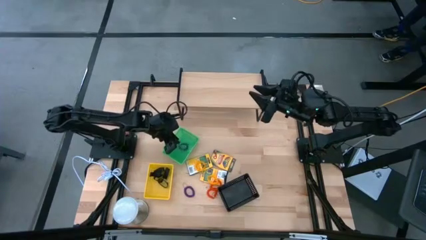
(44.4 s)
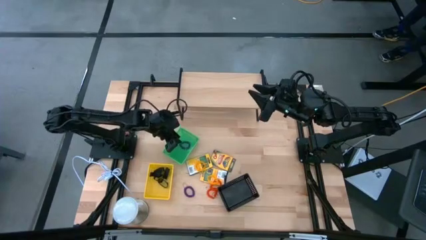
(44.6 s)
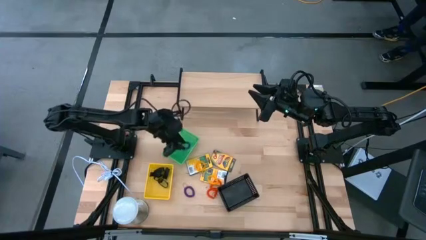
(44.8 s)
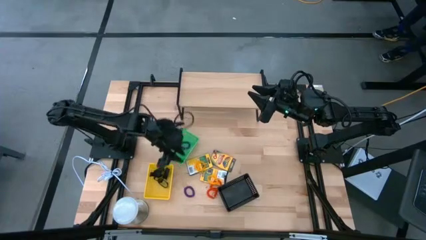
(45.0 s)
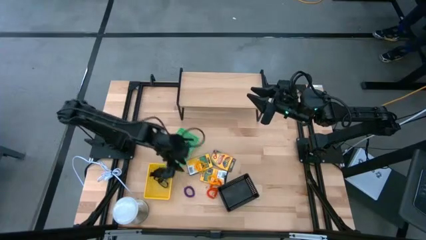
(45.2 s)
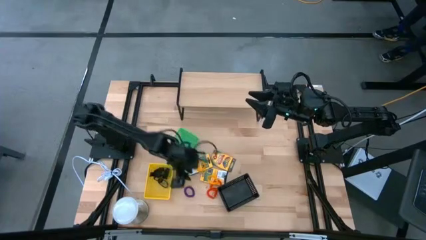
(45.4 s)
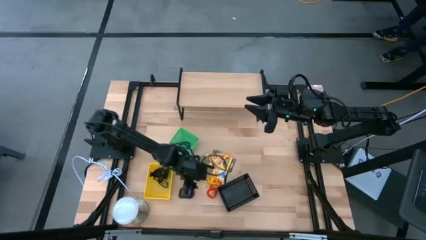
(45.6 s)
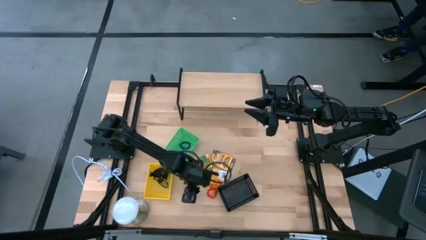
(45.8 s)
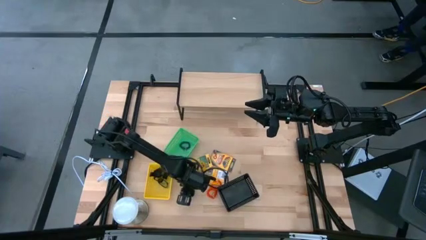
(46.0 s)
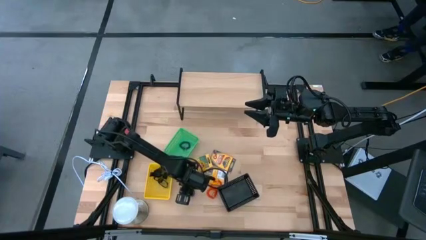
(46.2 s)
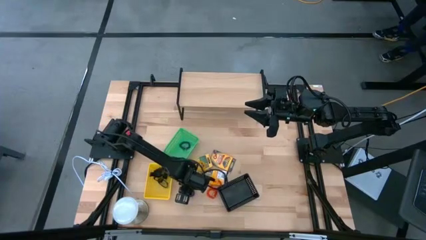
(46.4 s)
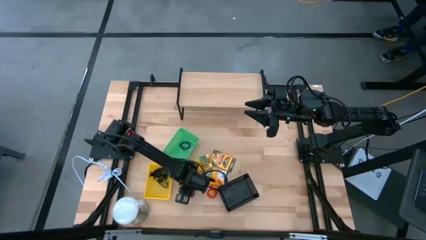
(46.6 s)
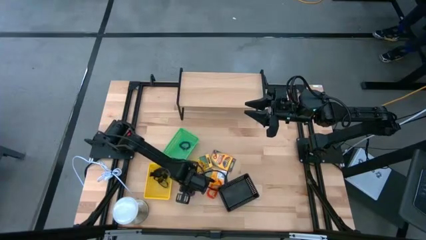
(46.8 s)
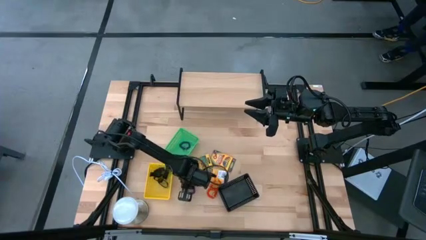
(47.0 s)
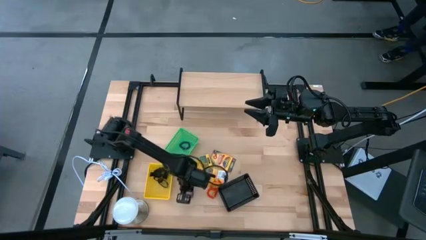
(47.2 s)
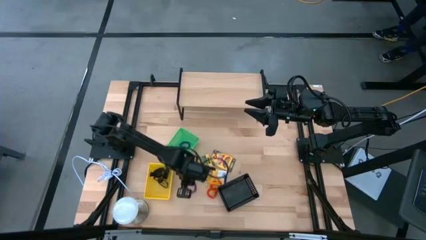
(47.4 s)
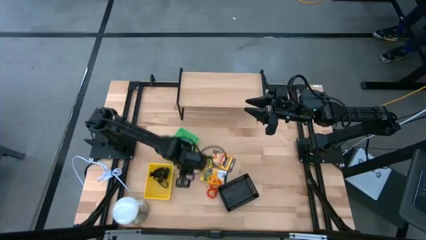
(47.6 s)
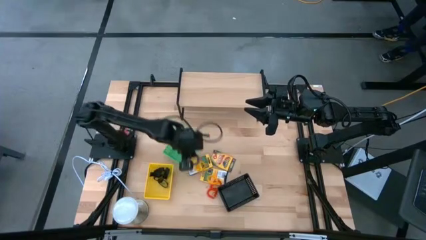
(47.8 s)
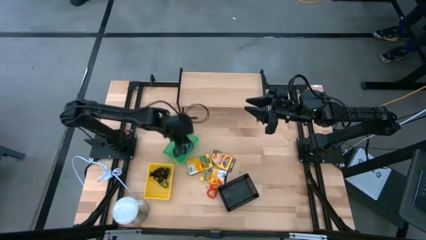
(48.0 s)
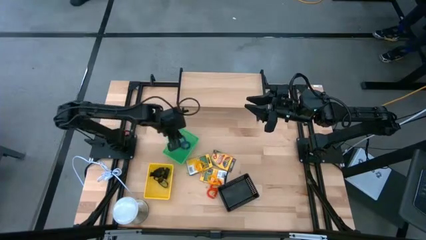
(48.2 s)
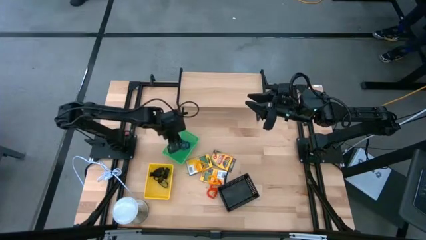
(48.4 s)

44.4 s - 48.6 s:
Task: Pick & Place Office Desk Supplies
Put the violet spring keychain into the green basket

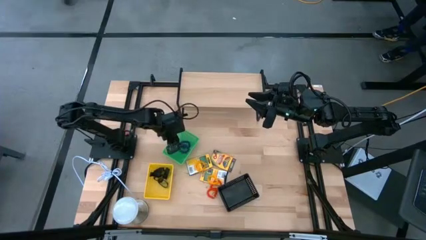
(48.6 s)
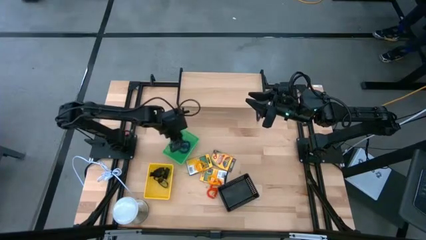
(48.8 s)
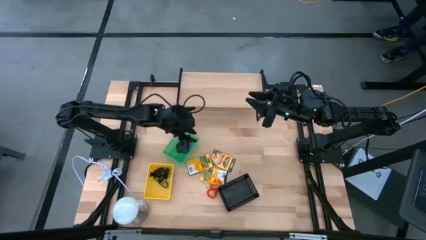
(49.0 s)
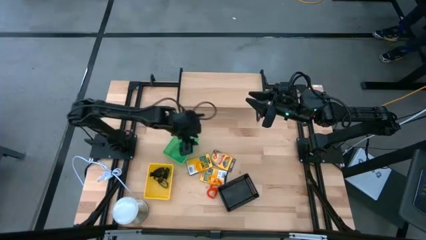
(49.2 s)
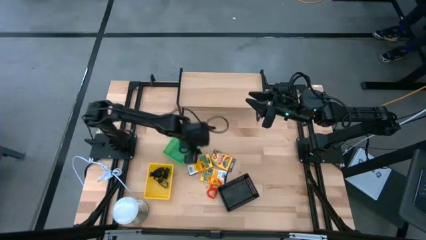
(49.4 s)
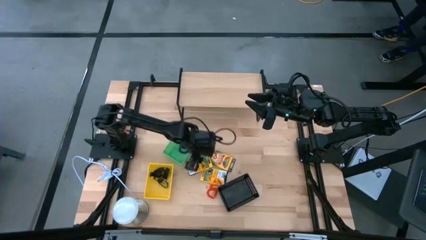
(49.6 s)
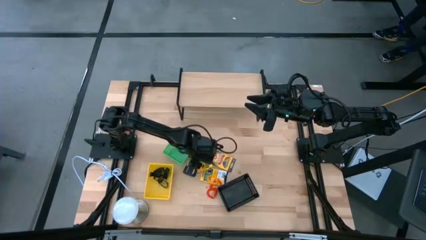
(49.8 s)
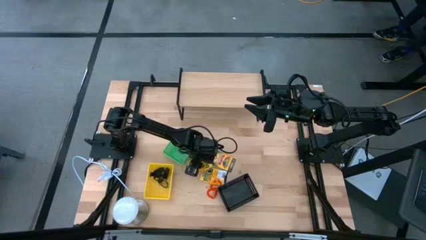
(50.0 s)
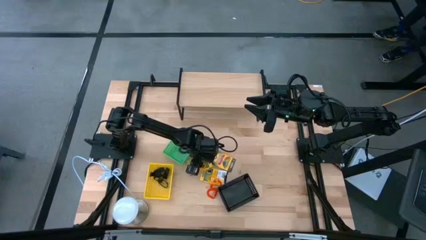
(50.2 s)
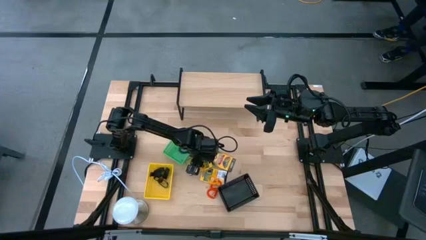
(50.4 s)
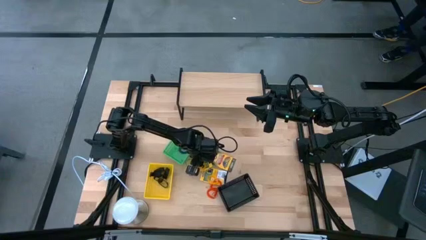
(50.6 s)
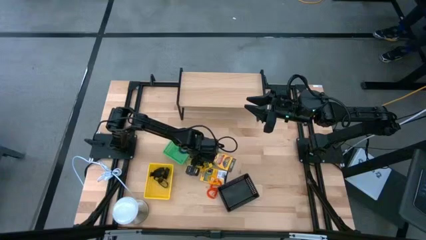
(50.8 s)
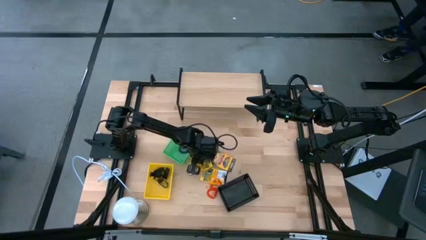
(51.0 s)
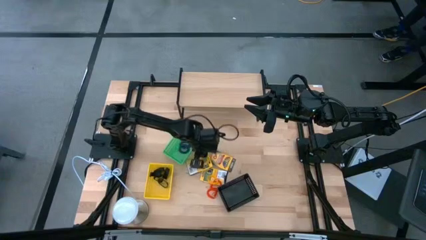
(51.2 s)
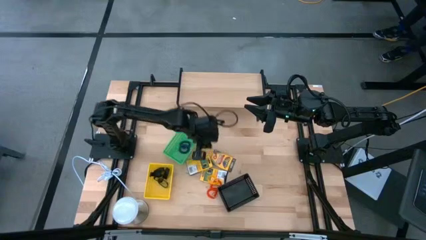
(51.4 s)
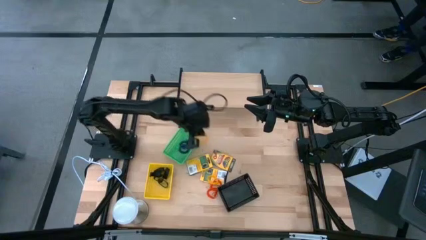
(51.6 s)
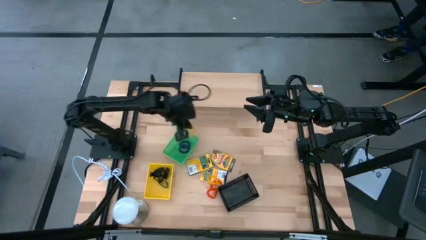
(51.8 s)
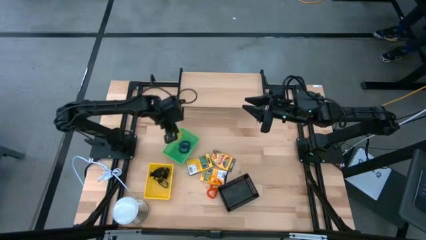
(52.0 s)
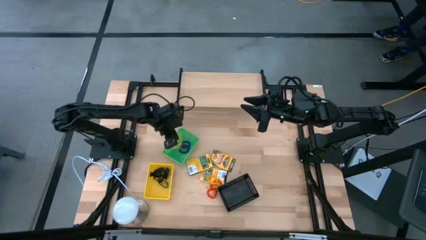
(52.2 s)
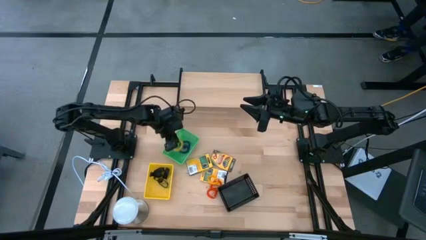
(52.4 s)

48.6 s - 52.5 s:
Put the yellow spring keychain into the green basket

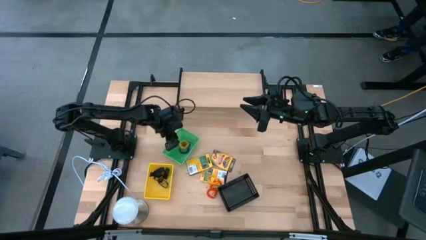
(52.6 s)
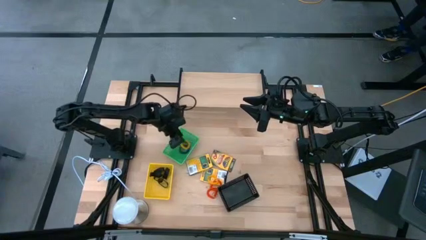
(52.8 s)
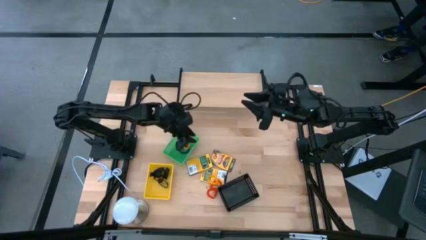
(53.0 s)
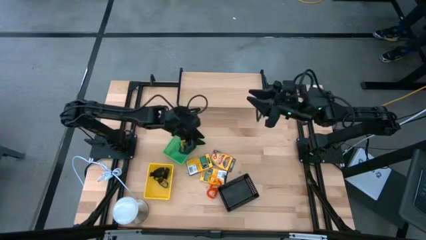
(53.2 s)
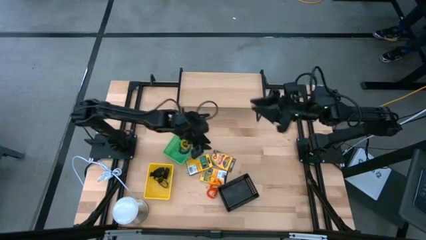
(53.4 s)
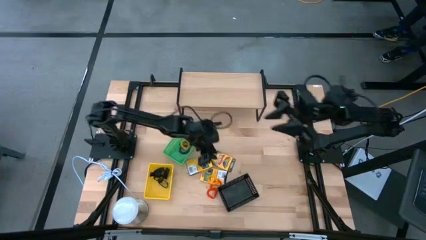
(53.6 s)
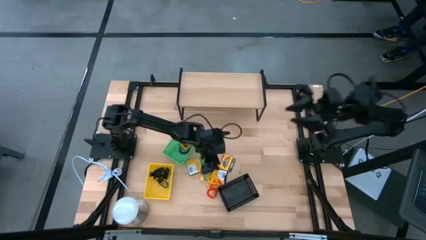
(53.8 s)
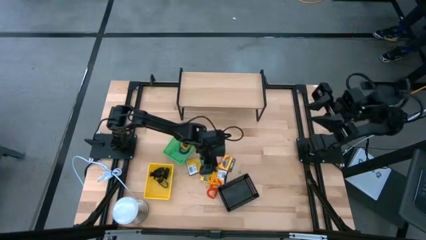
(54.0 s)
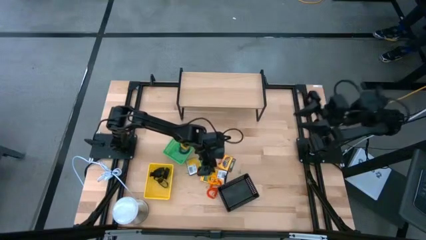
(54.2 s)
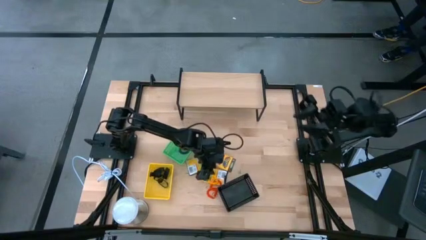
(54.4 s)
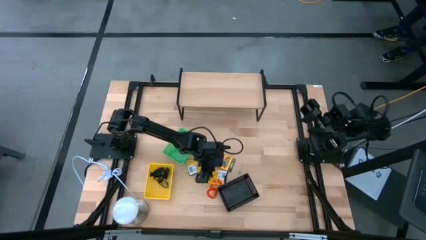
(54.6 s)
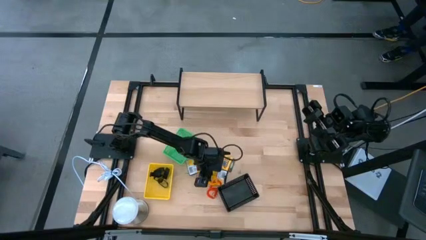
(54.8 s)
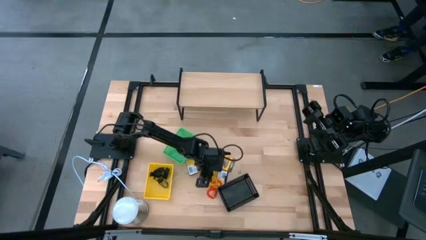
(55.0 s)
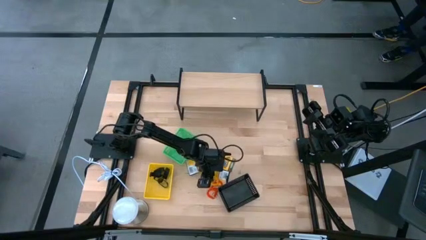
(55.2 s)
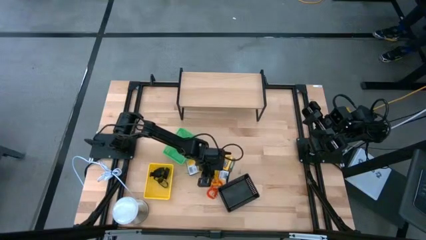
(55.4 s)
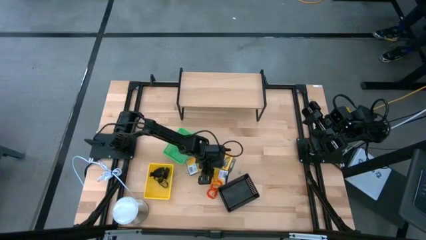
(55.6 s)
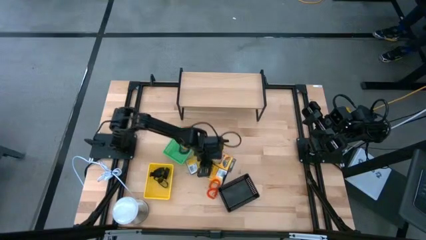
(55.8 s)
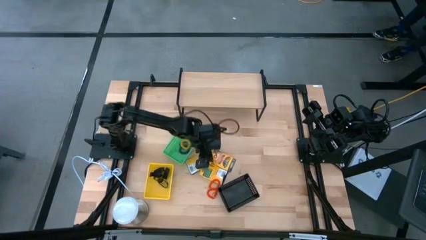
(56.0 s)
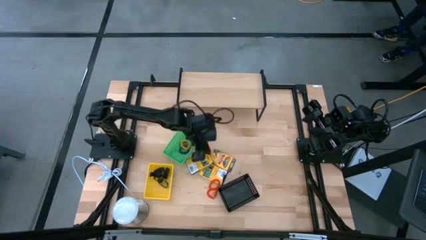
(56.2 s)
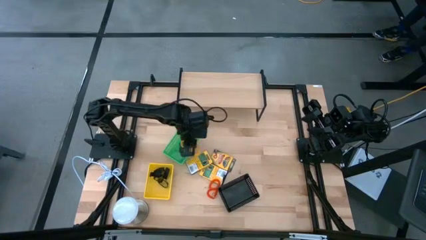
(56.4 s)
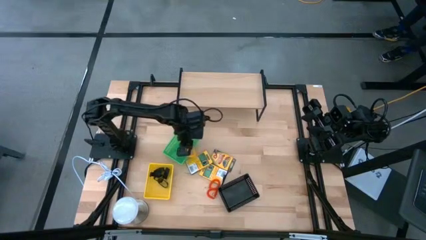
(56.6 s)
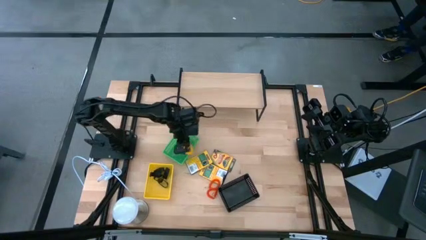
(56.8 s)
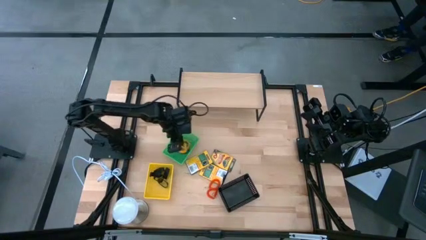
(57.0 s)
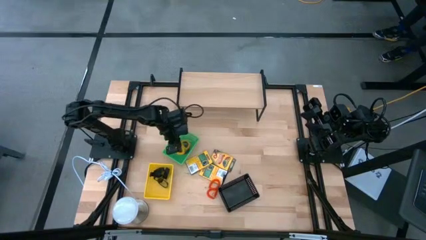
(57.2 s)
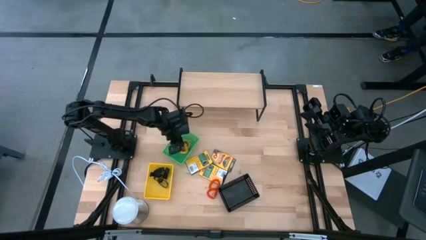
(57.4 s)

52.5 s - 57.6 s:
Put the yellow spring keychain into the green basket

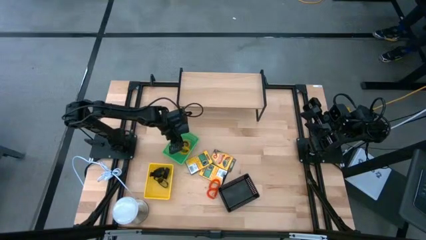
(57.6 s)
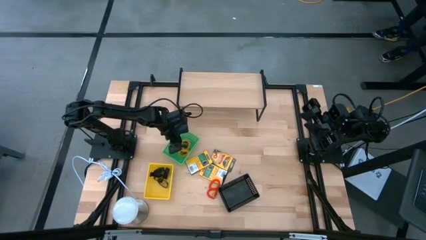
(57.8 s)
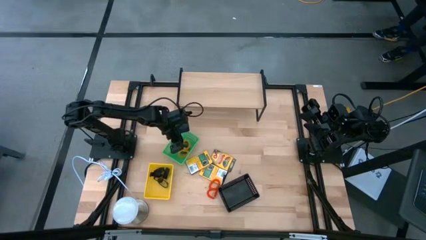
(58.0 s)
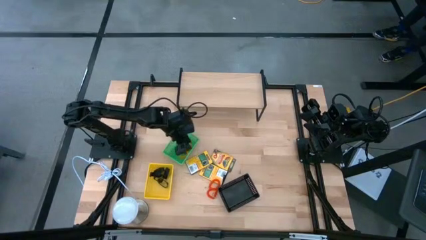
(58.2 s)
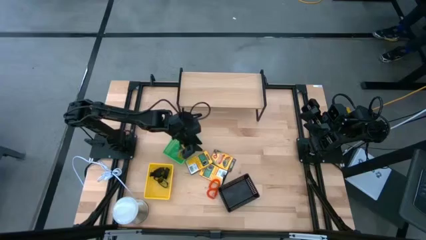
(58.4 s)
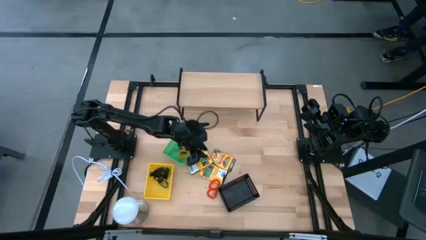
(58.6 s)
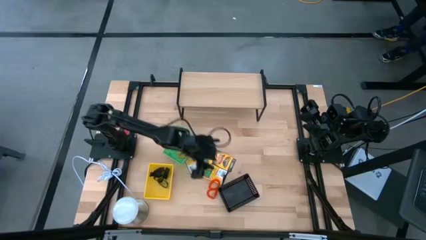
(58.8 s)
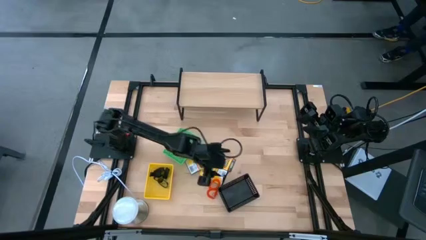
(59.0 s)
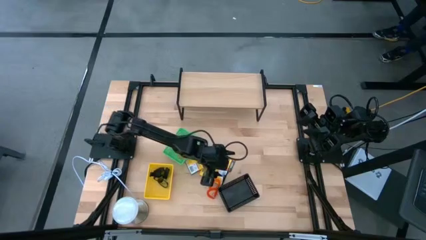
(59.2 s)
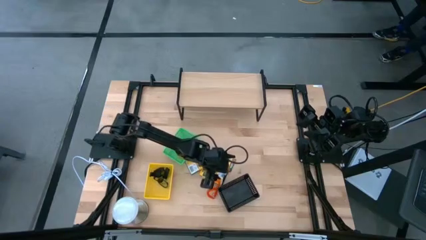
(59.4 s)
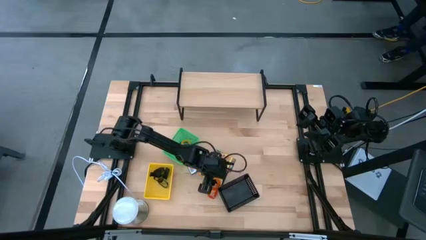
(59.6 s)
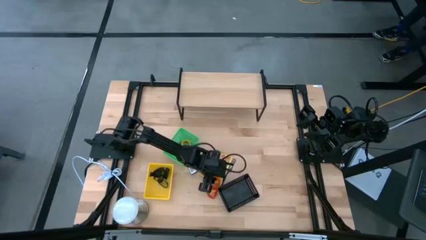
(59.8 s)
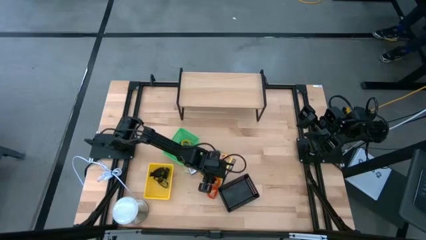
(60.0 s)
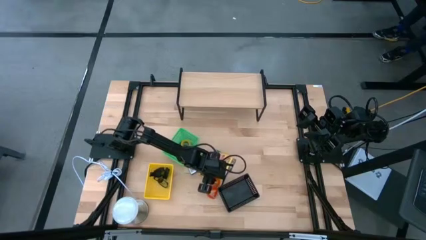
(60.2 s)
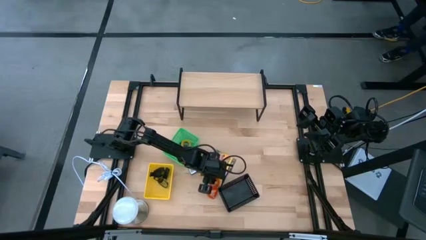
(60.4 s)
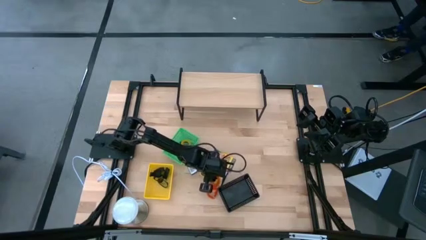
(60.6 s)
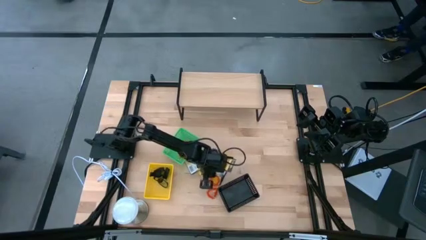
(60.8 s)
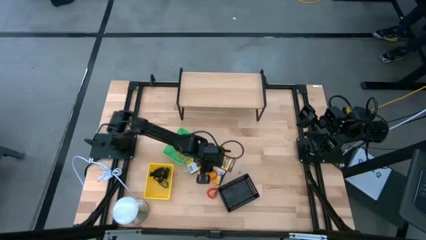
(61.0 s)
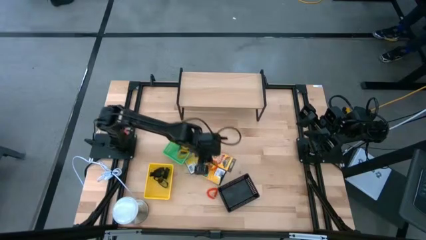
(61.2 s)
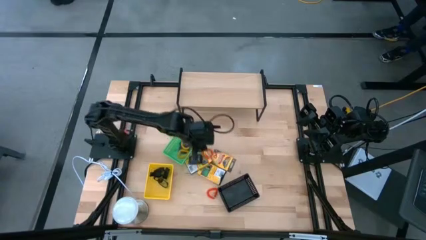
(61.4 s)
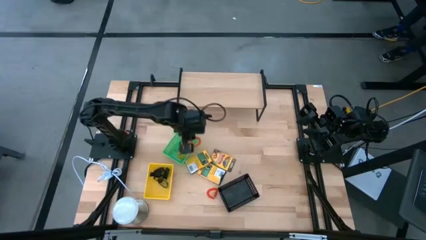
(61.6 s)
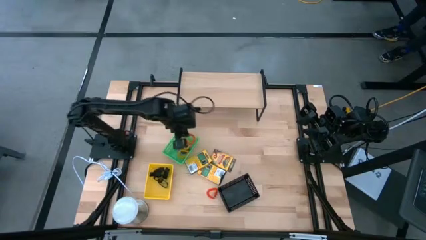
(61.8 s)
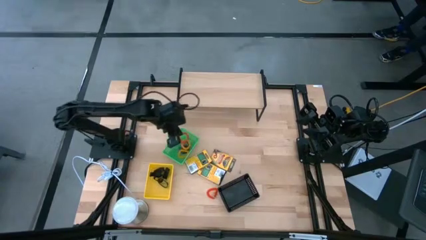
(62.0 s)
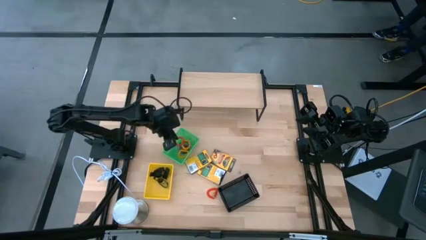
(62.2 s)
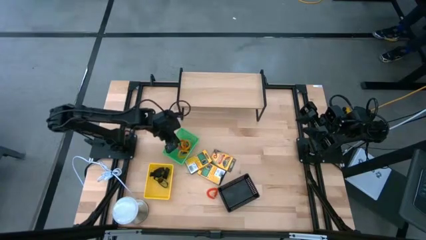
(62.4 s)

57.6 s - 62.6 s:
Put the orange spring keychain into the green basket
